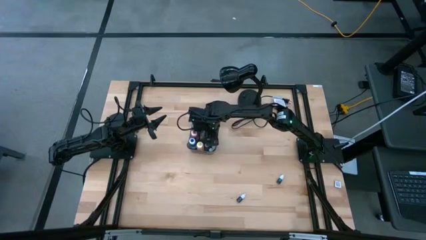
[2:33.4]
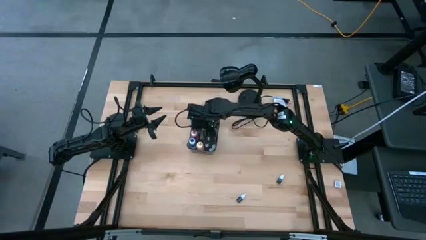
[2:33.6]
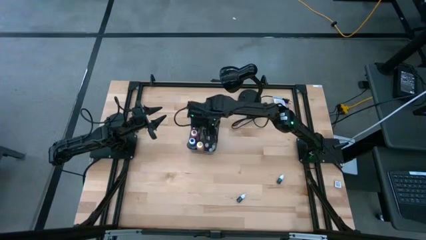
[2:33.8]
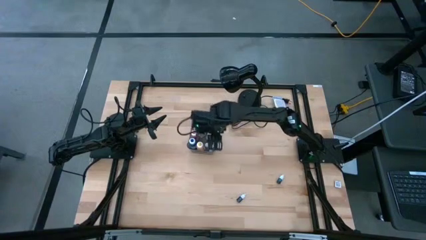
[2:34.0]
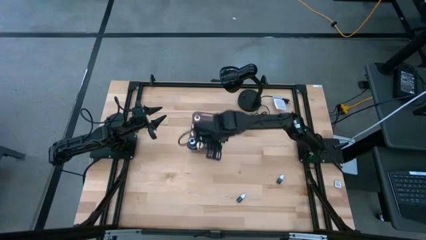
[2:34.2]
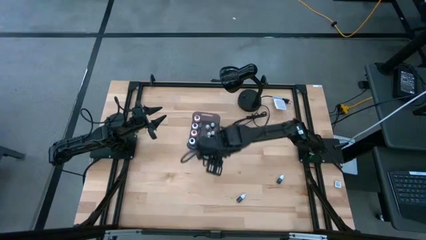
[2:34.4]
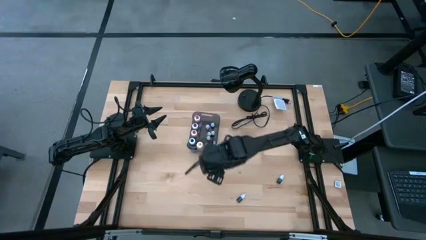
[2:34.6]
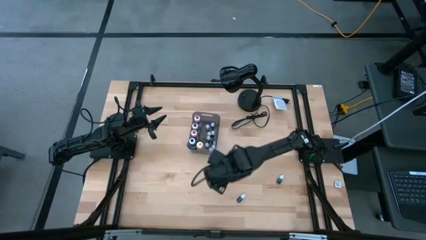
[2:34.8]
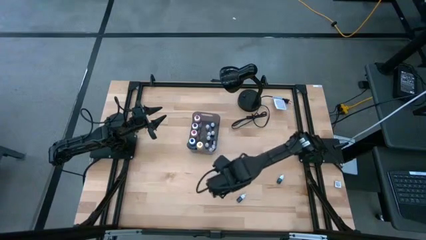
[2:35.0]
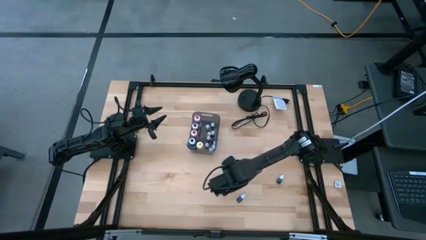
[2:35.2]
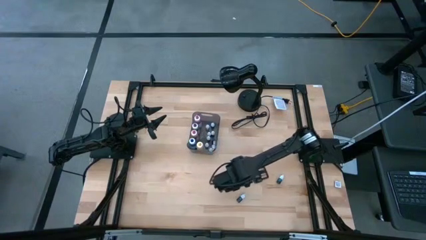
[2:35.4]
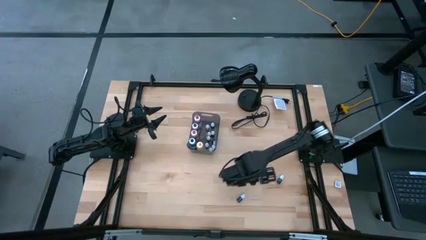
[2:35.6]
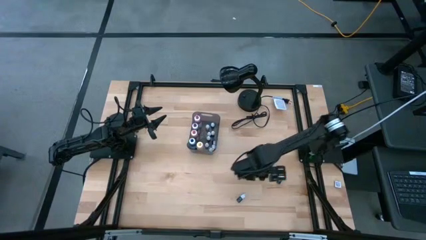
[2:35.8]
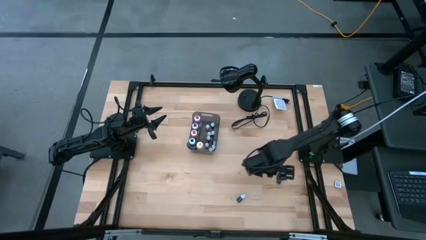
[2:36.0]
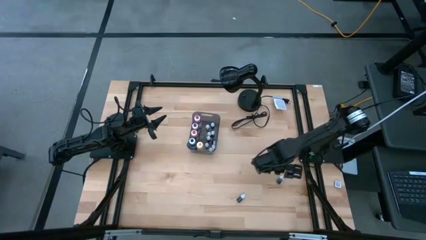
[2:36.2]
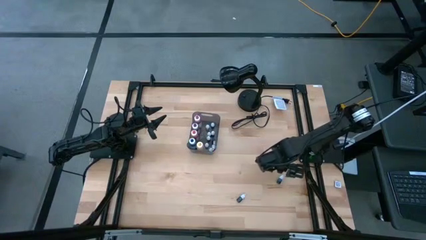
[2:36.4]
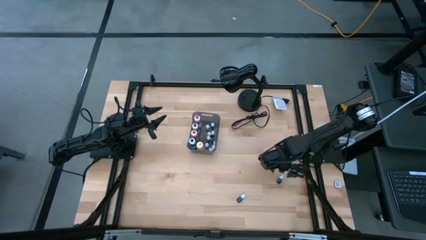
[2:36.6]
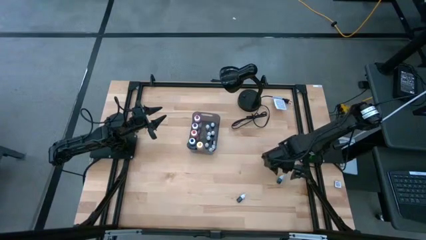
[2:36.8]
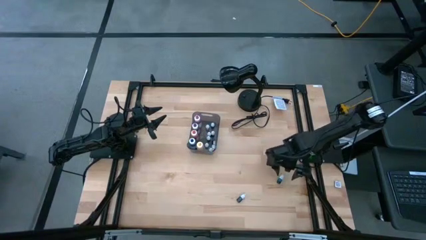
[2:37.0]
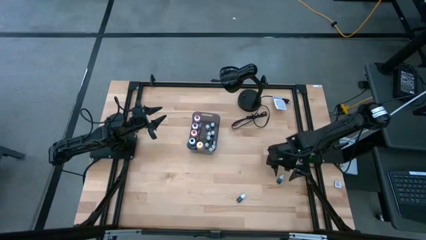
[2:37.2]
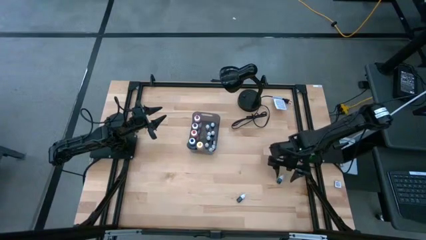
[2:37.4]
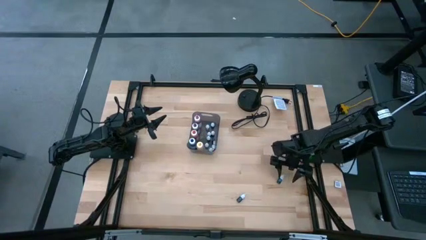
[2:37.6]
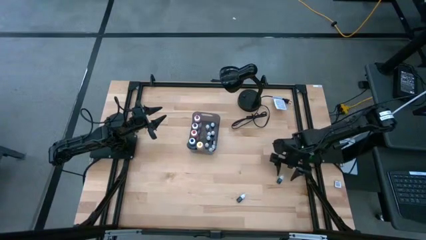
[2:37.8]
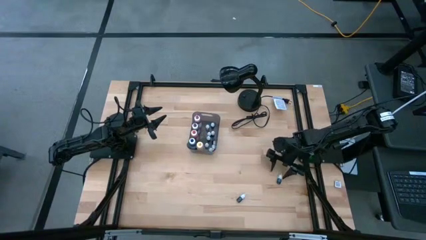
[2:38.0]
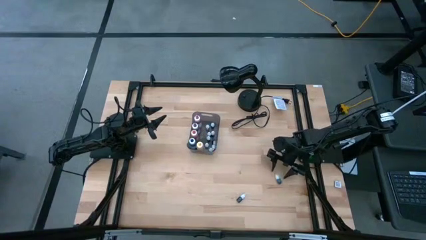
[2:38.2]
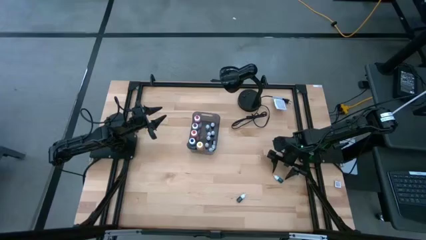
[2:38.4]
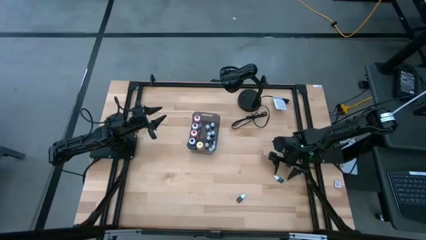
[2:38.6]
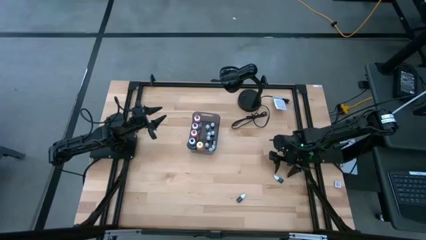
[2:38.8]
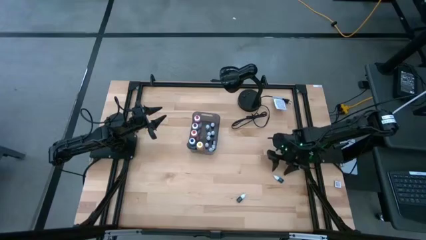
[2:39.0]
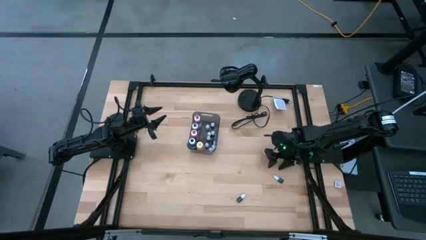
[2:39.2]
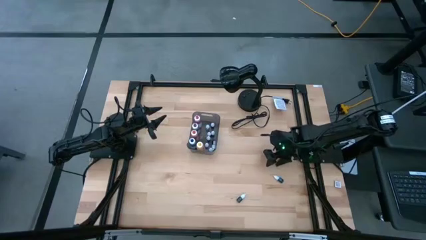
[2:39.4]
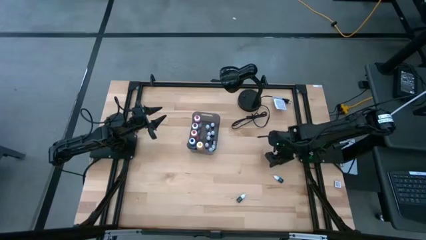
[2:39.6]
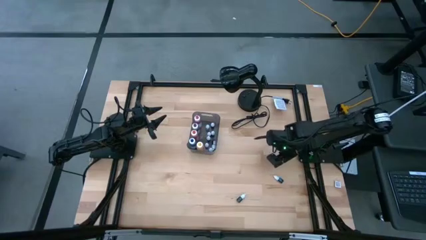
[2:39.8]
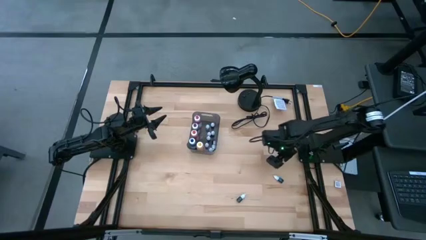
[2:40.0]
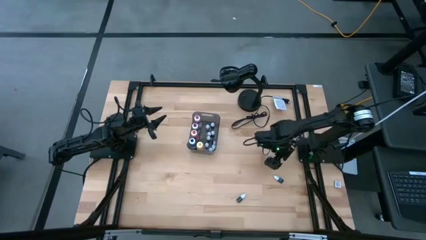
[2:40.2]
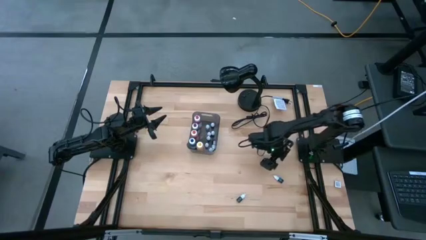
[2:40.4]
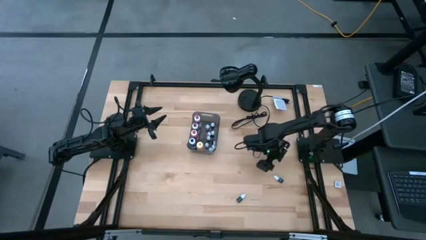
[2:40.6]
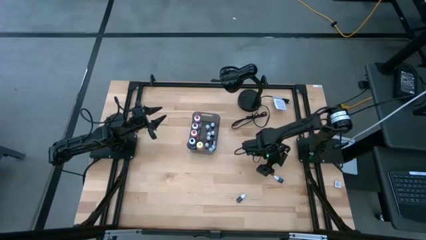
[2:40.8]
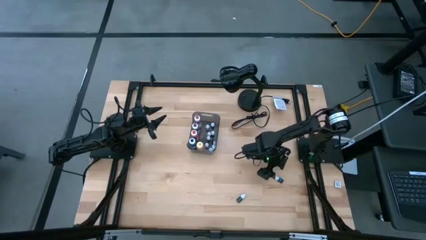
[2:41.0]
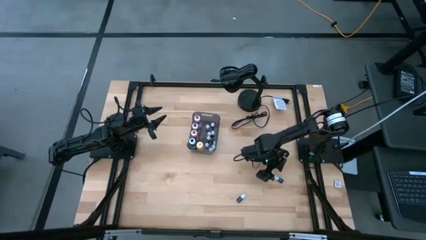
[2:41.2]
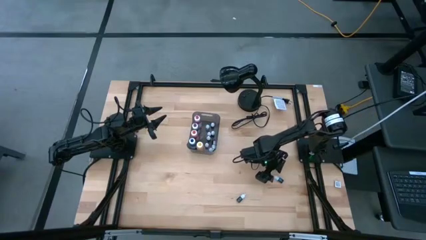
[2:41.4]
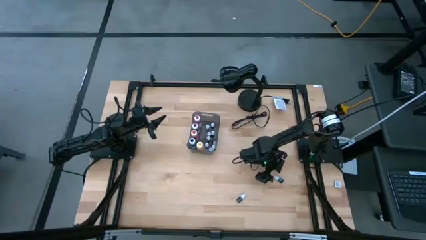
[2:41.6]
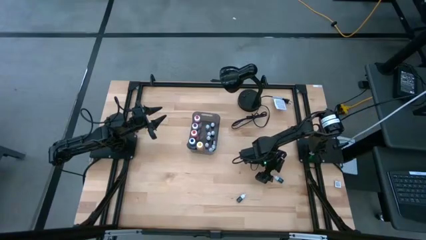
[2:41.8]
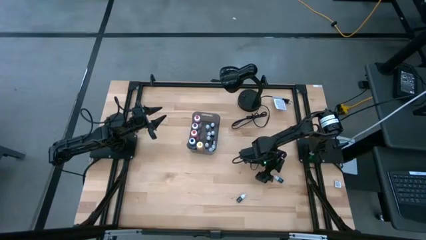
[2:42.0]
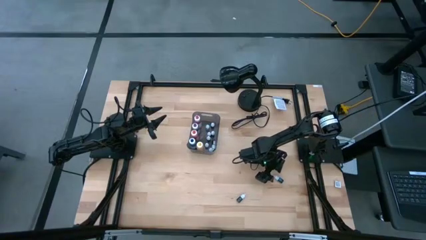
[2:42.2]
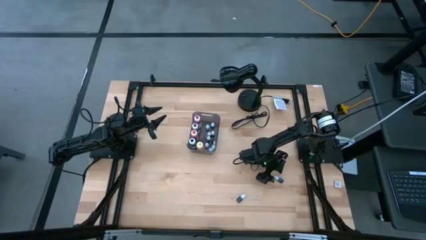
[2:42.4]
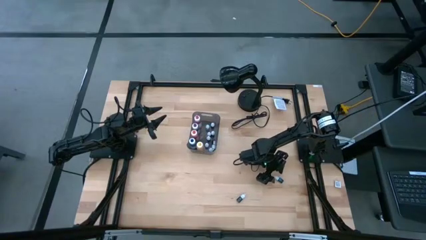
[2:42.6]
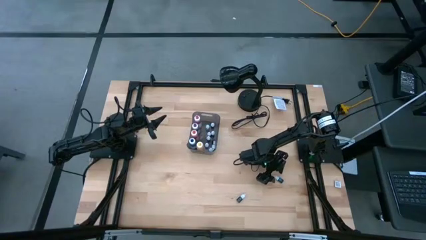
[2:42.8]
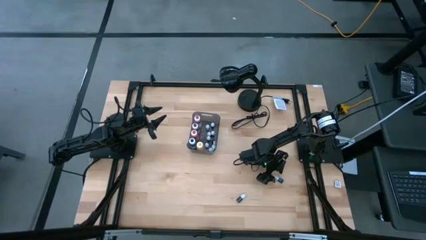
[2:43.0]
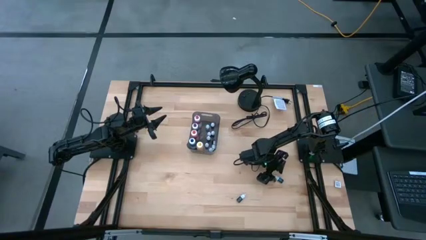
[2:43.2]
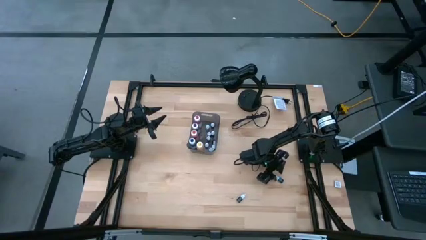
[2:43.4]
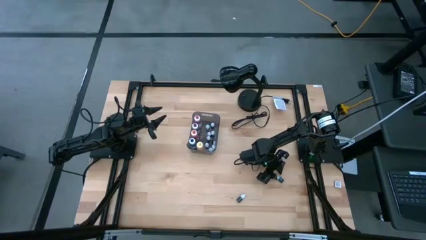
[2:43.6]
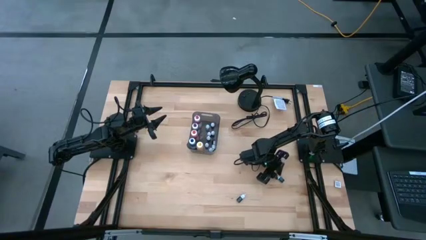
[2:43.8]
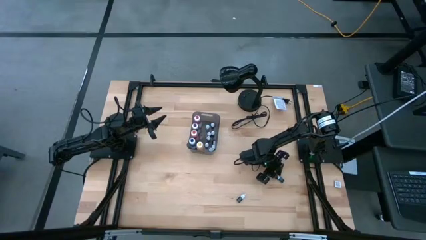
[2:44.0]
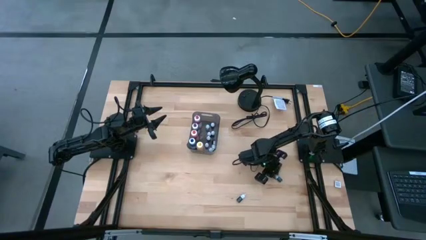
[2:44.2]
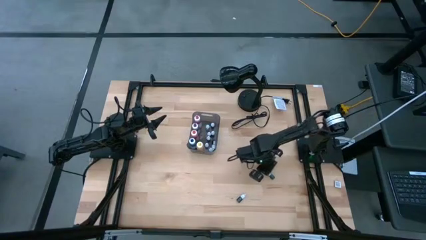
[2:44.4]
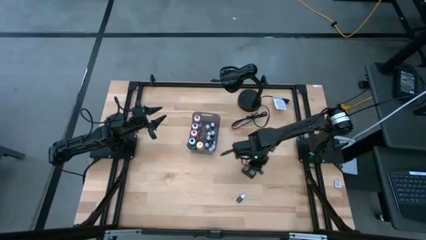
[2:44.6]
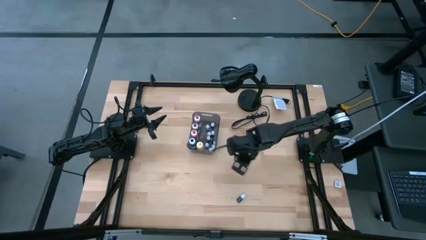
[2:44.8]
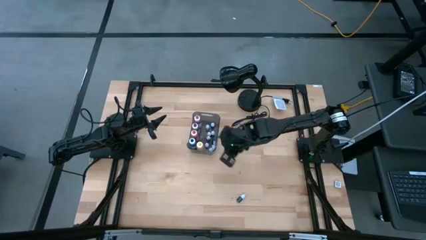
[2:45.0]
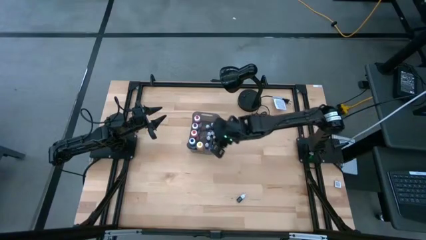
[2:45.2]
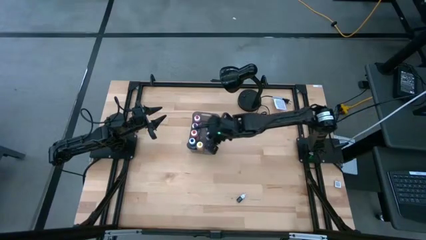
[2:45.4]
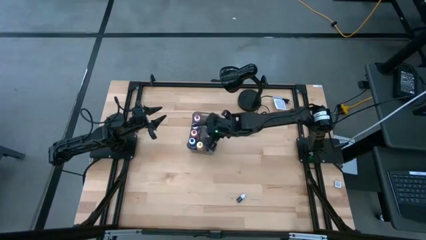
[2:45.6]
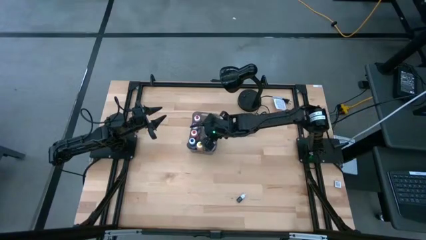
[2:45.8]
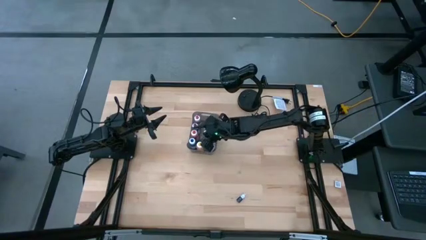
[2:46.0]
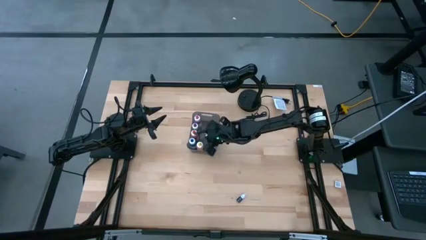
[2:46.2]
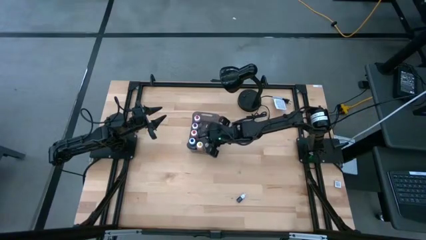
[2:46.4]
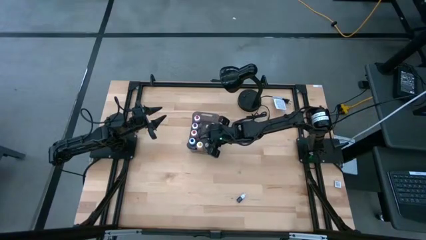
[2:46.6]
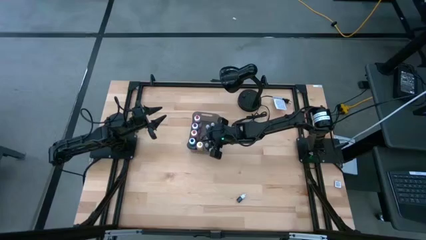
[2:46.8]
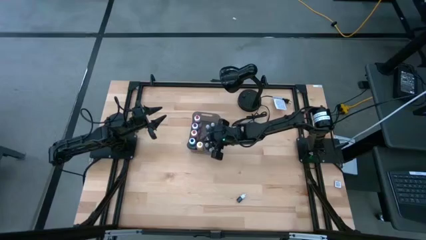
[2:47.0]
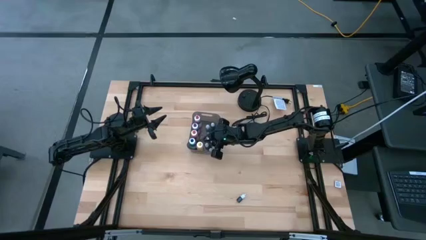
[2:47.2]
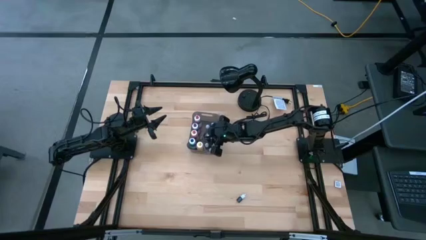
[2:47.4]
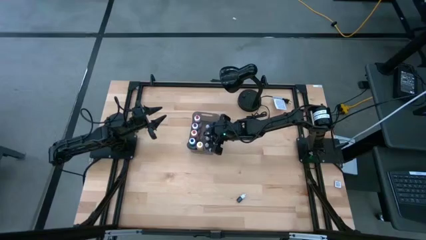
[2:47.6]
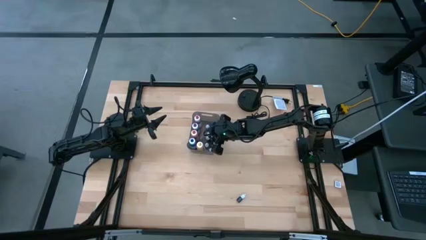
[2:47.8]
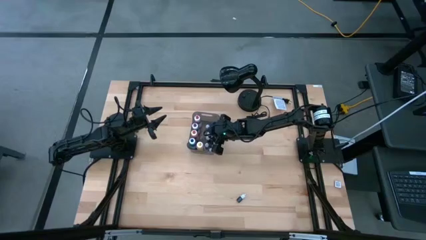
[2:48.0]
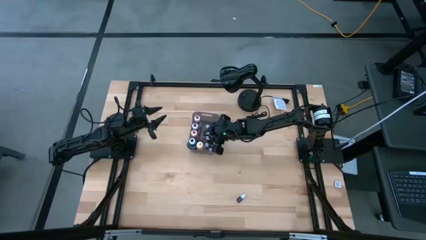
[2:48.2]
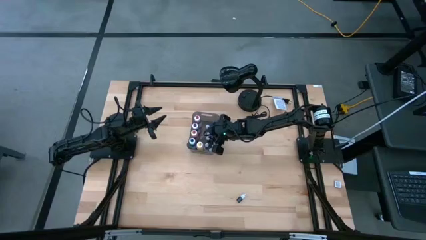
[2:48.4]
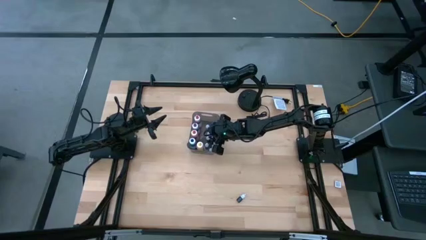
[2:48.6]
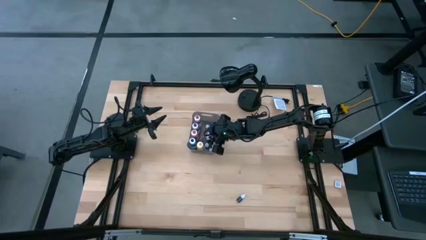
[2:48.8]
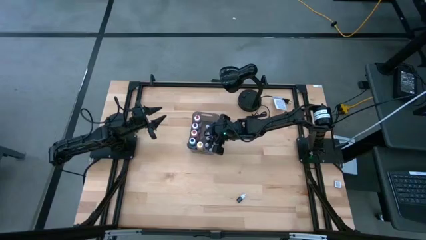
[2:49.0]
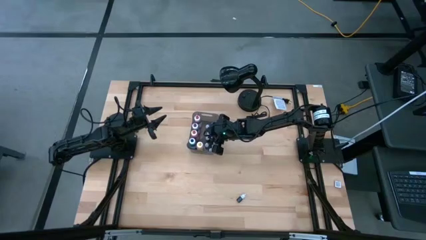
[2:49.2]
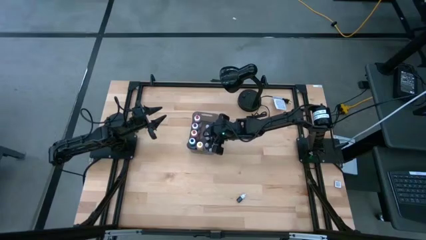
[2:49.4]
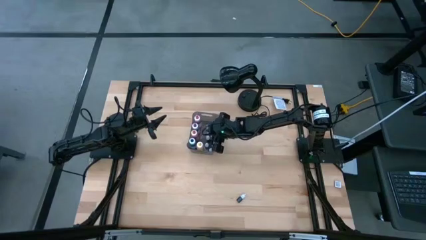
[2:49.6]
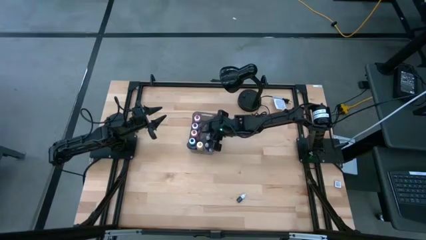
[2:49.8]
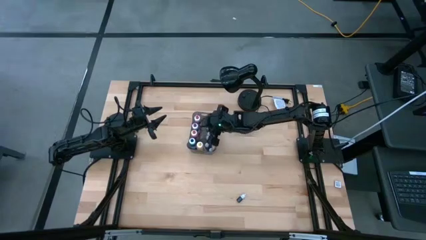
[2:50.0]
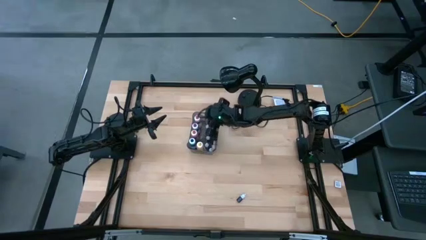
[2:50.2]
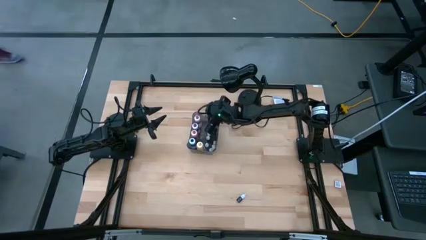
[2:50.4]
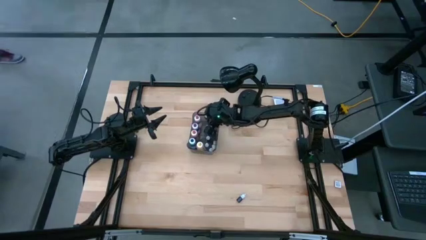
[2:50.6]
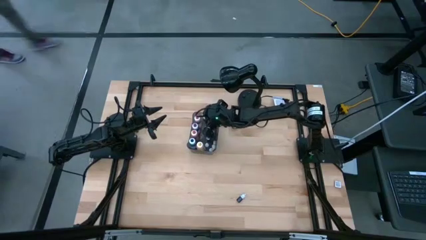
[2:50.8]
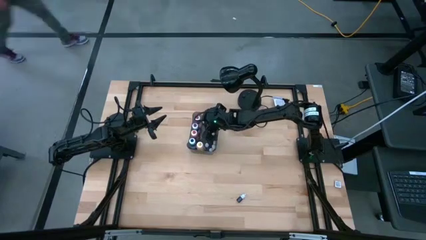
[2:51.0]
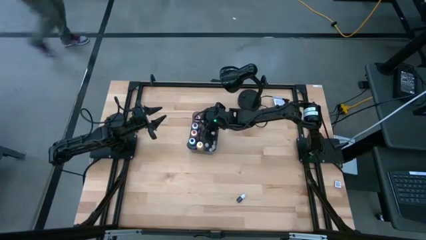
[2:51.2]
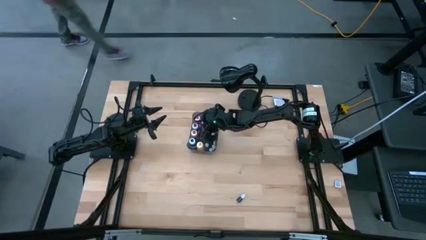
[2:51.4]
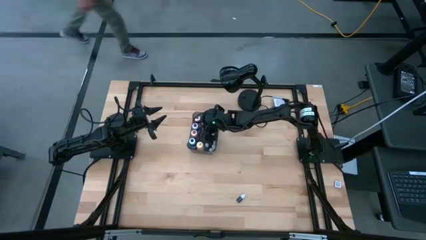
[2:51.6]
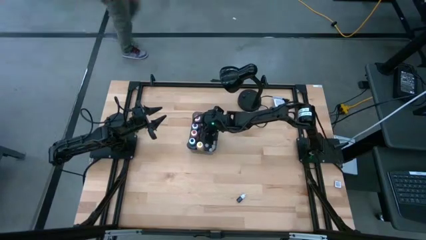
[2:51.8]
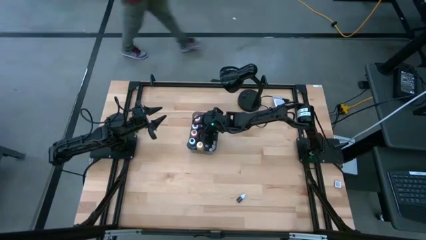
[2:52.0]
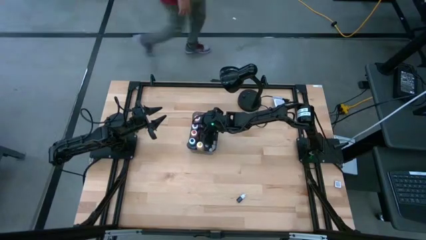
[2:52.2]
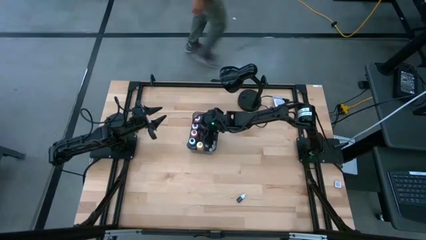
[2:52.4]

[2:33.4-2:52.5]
Task: Pick & Place food coloring
Put the small blue food coloring bottle into the gray transparent bin
